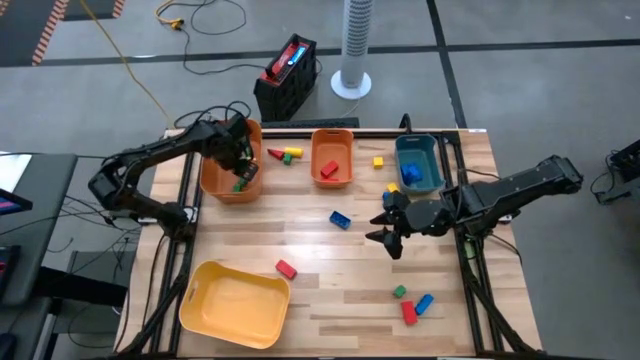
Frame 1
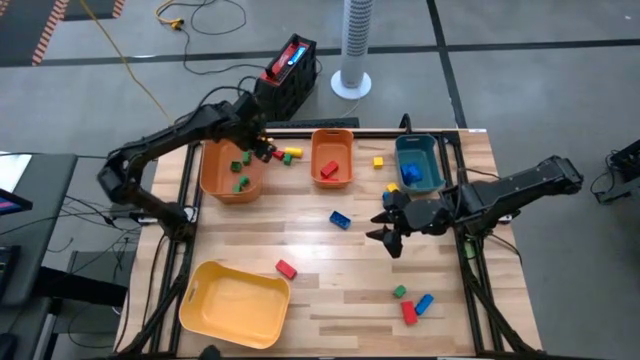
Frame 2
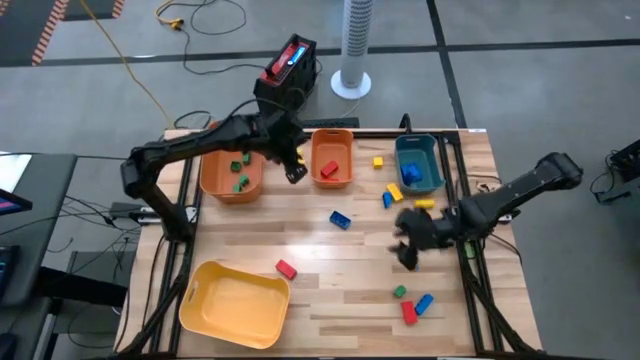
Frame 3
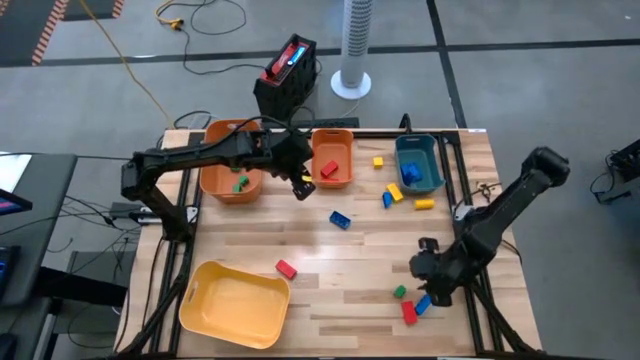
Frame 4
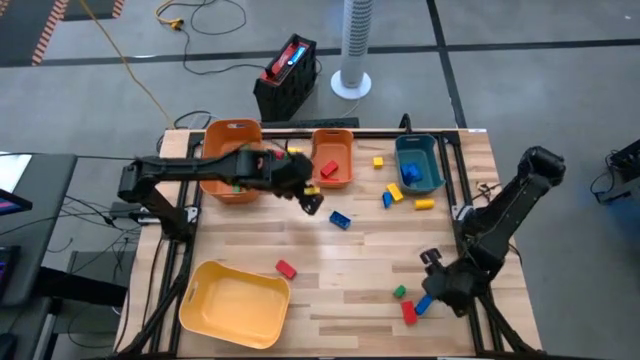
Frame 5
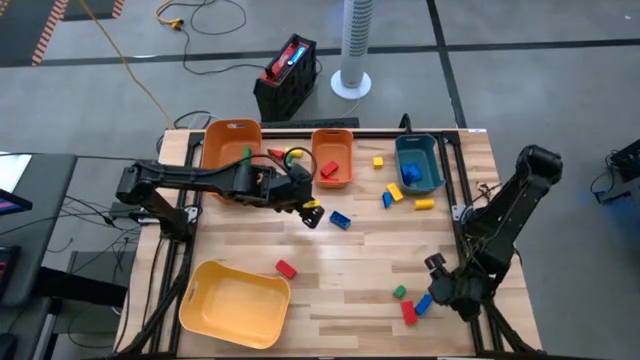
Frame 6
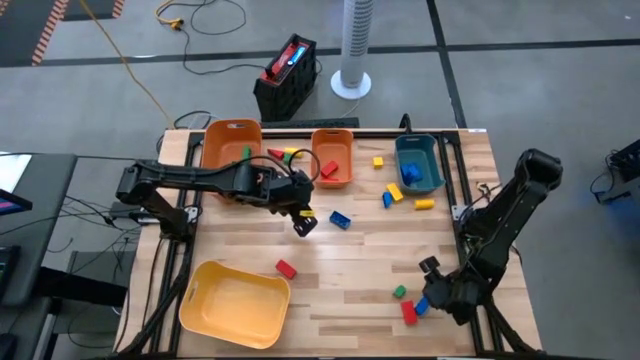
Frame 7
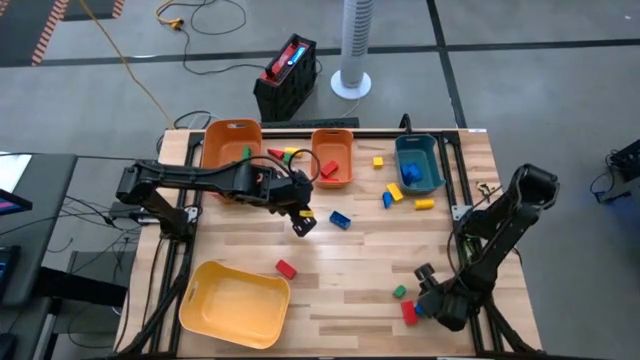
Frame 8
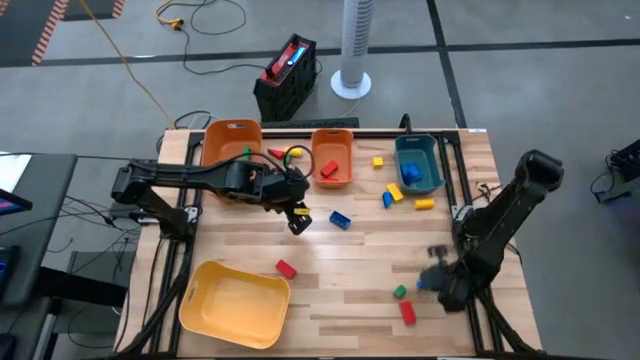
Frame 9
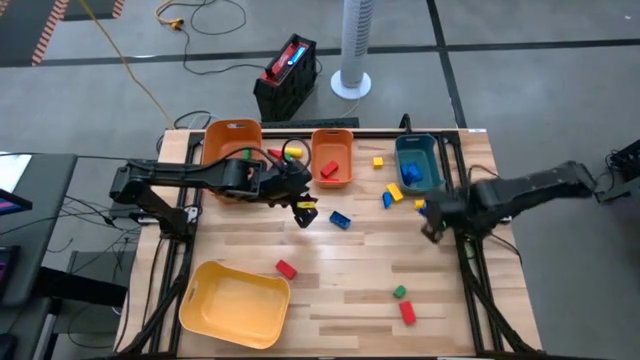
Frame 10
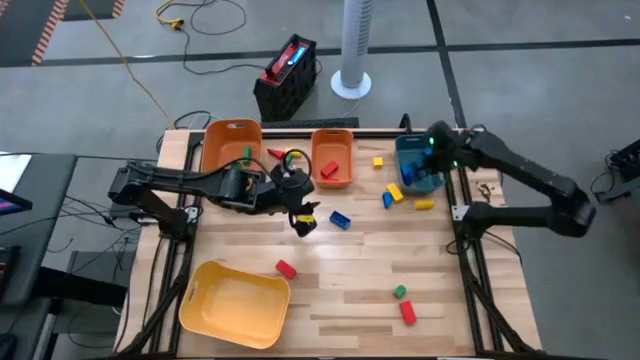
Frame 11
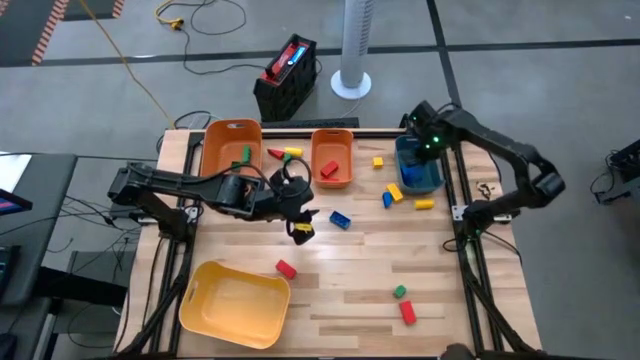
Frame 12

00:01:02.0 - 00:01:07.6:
Task: Sort blocks
Put the blue game piece into the green bin

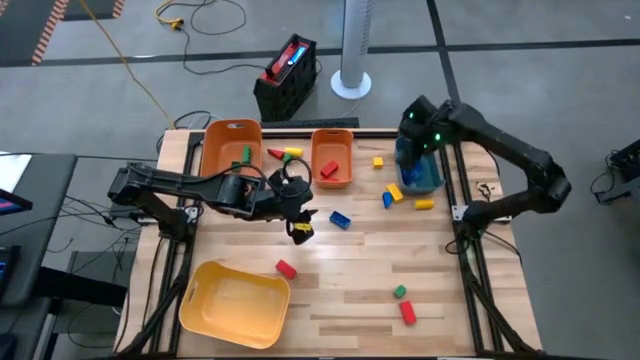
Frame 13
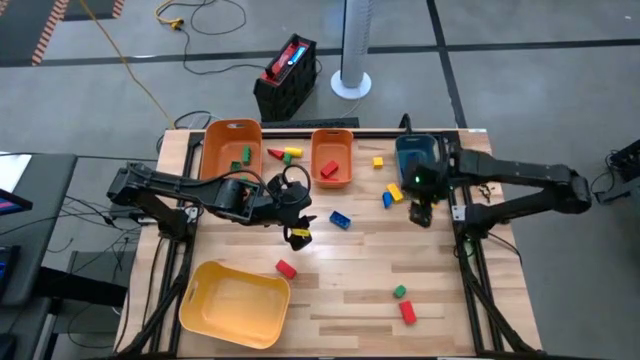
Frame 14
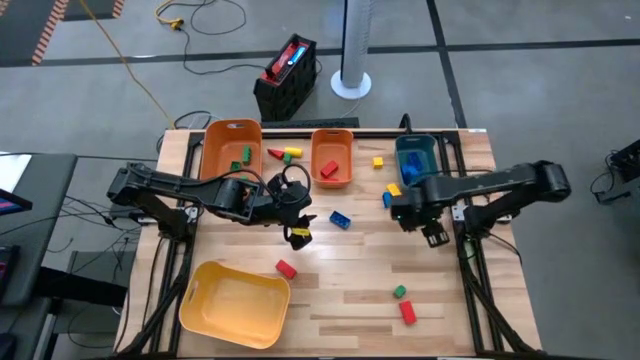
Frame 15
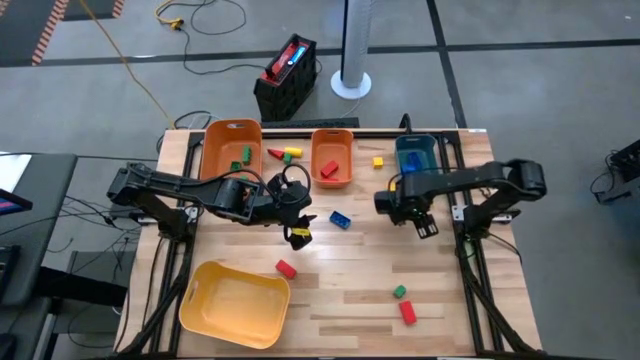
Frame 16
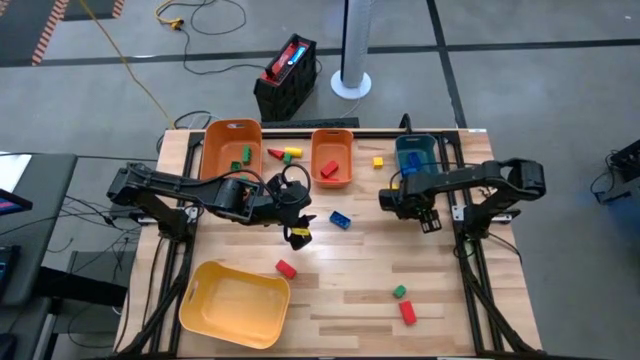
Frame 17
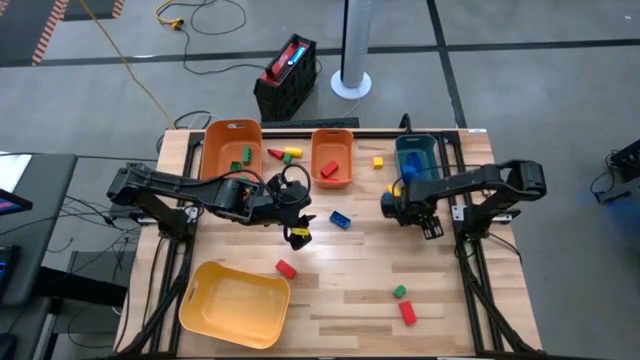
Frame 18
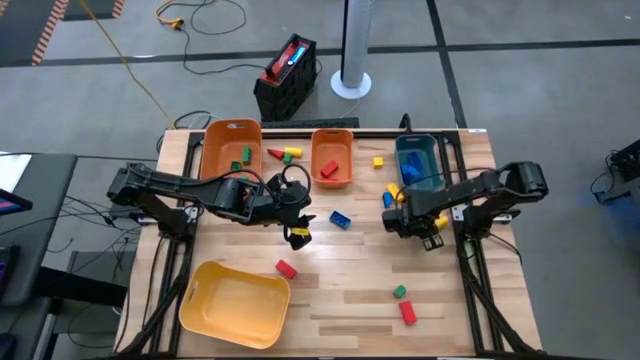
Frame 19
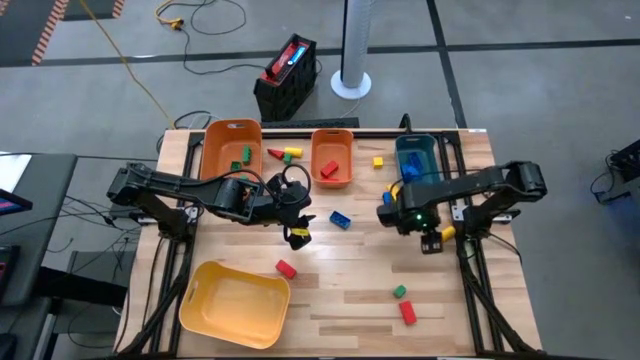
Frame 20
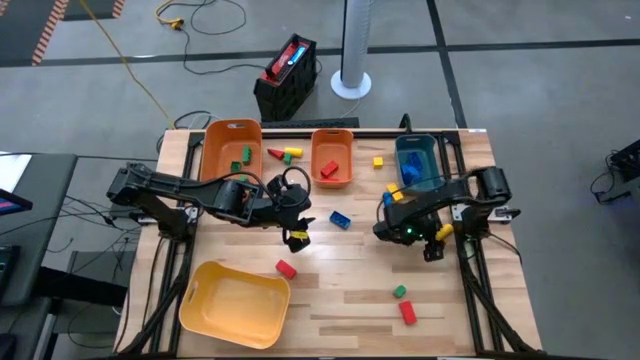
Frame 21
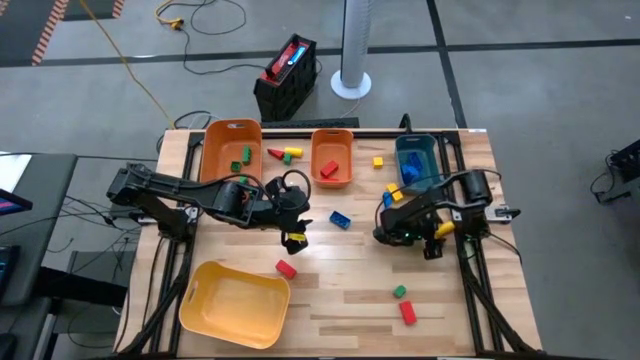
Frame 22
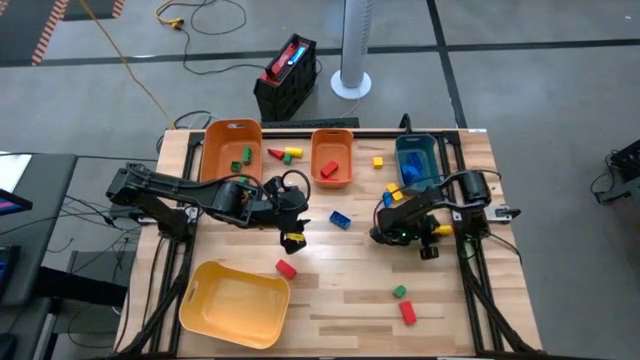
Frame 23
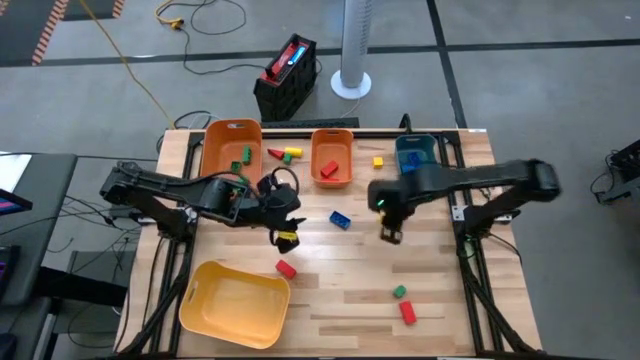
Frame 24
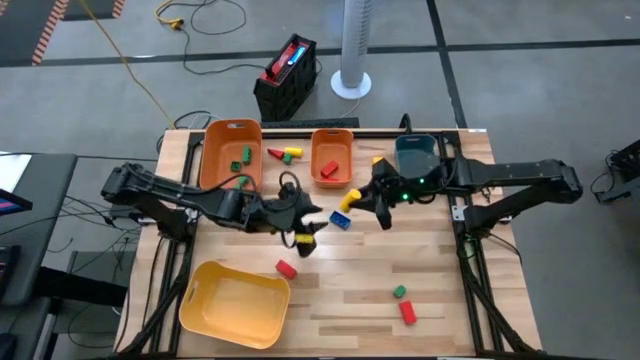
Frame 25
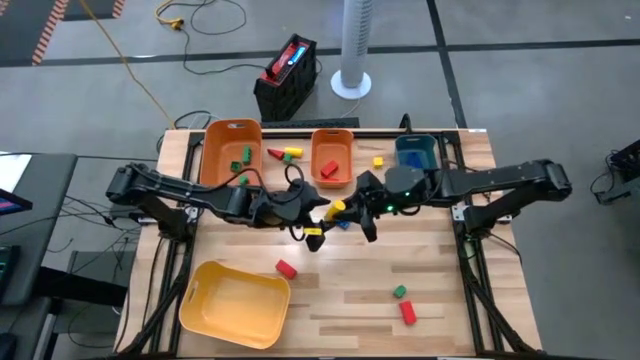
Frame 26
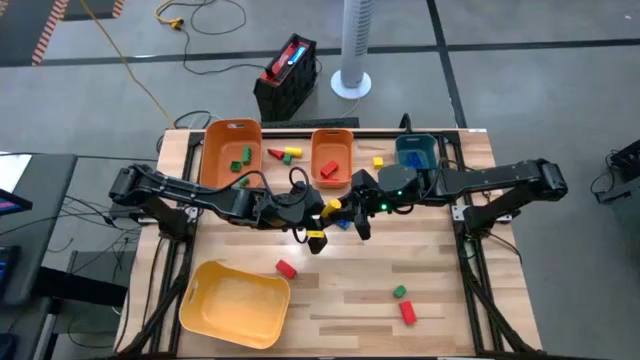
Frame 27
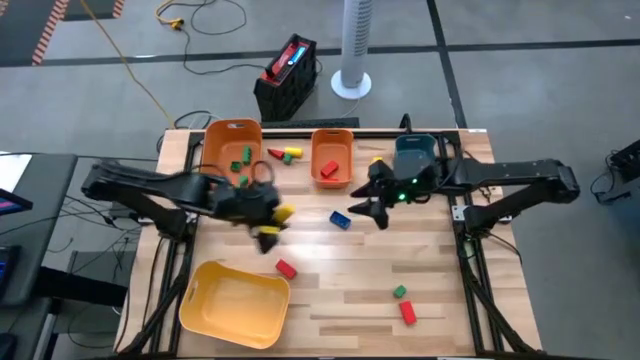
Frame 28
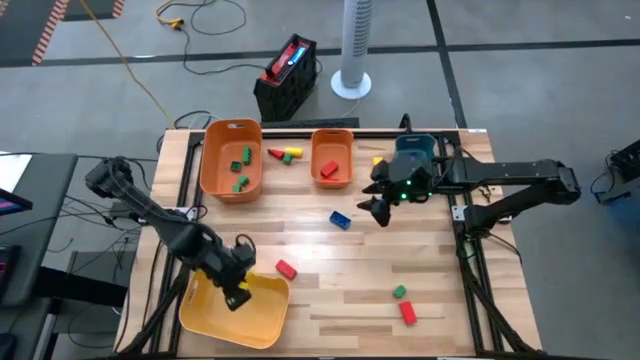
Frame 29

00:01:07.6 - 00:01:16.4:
Put the yellow block into the yellow bin

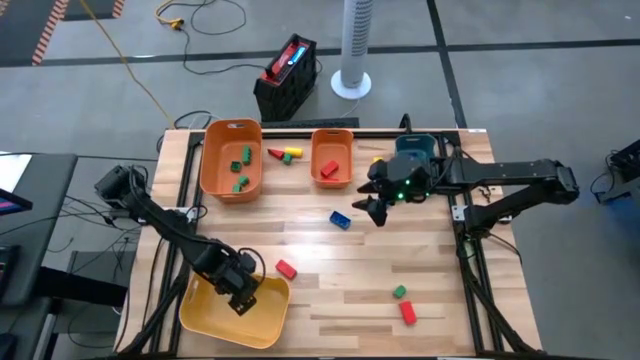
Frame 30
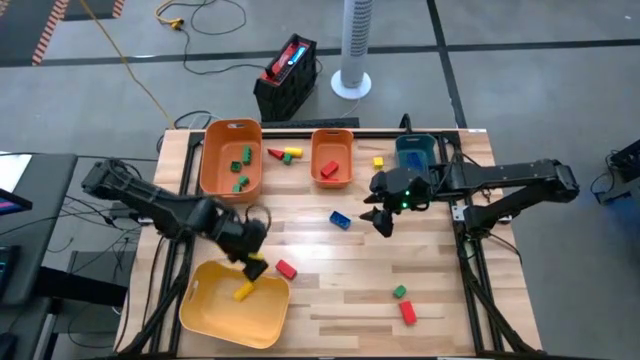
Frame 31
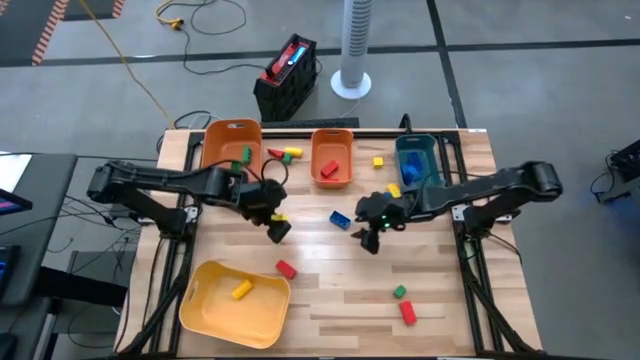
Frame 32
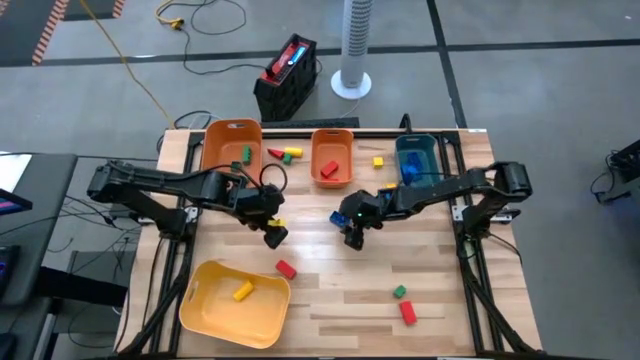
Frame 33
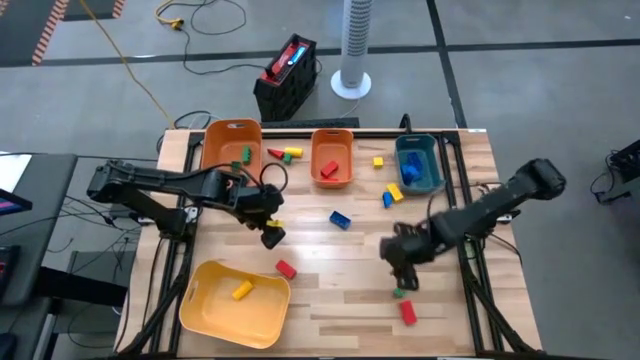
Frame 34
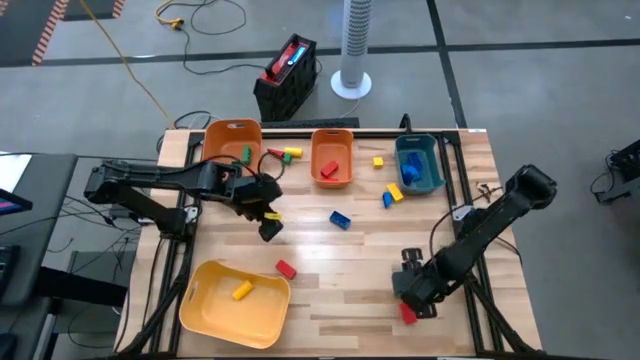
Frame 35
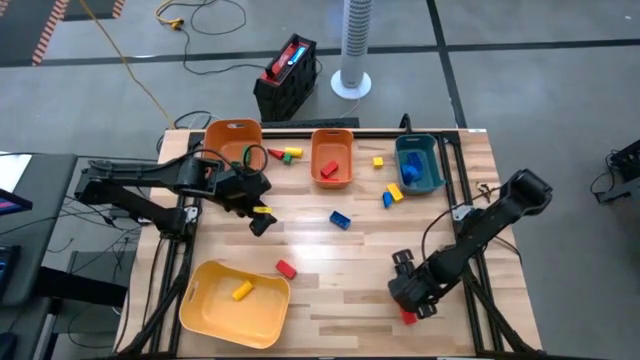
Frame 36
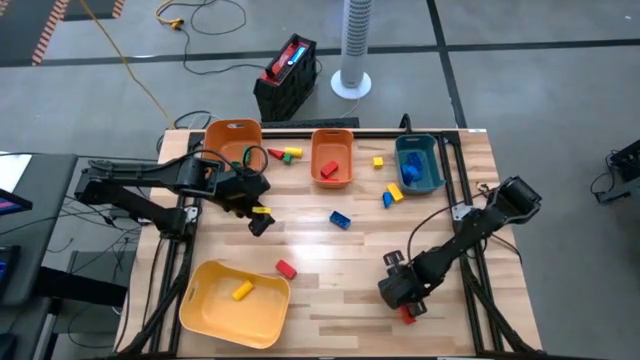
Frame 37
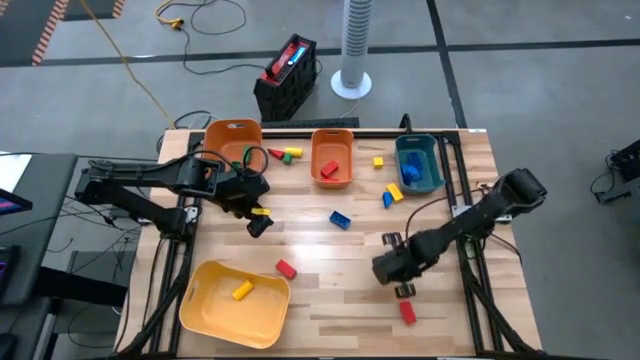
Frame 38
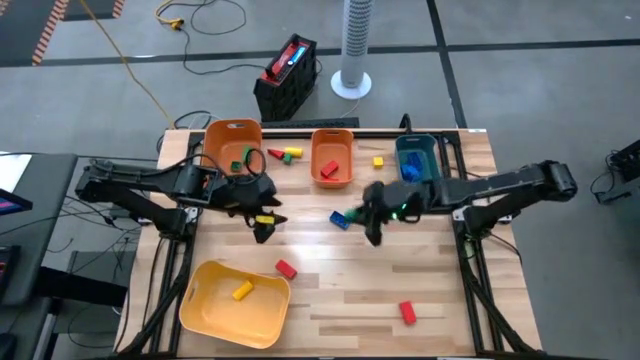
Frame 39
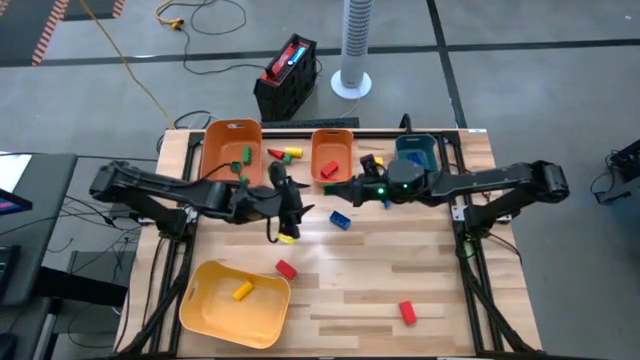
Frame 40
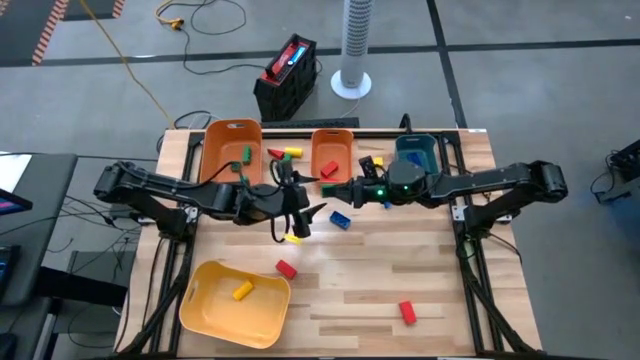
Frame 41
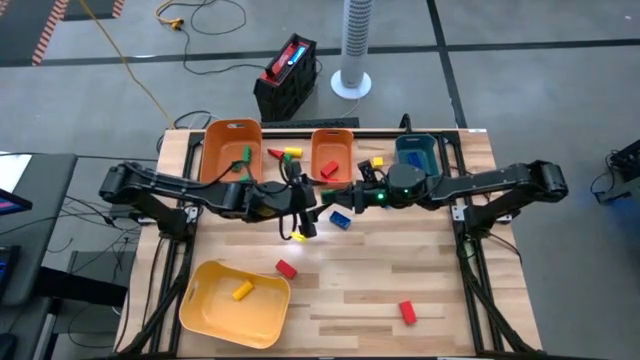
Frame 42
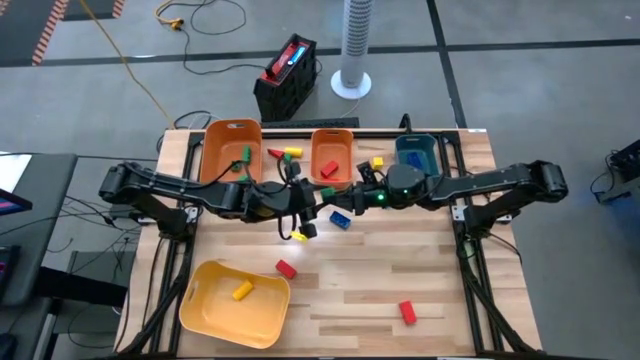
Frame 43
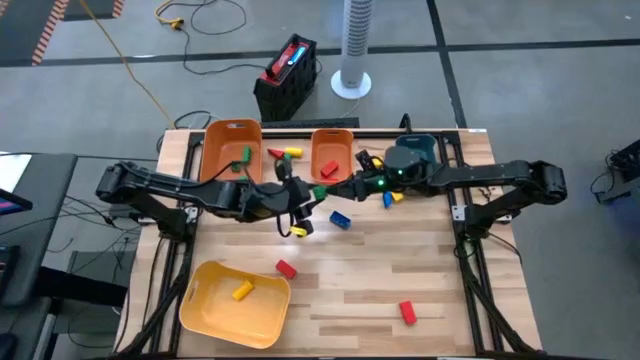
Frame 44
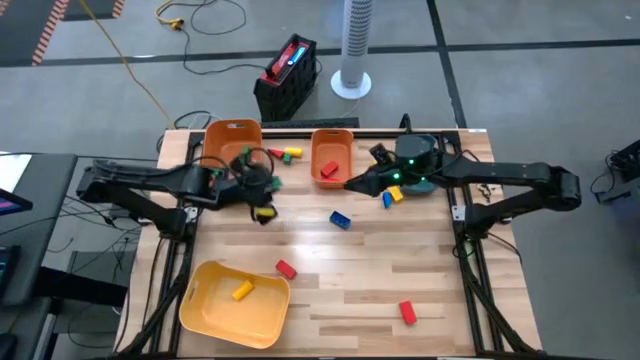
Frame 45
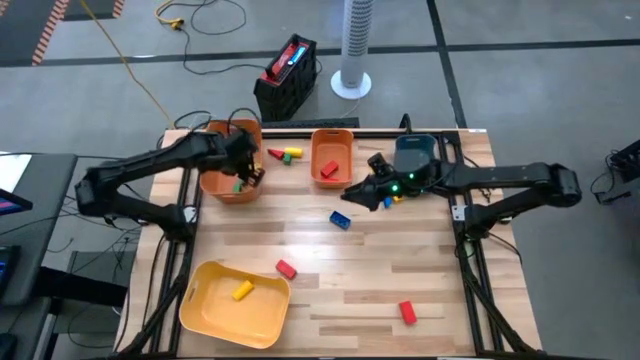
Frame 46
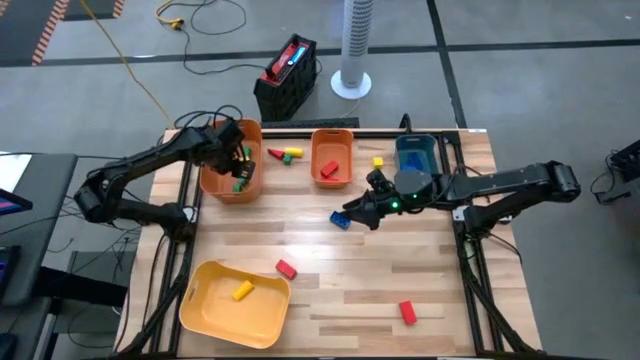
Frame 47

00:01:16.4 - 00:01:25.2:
Put the green game piece into the left orange bin
